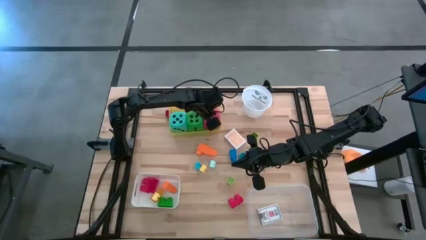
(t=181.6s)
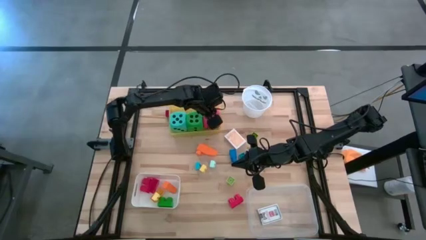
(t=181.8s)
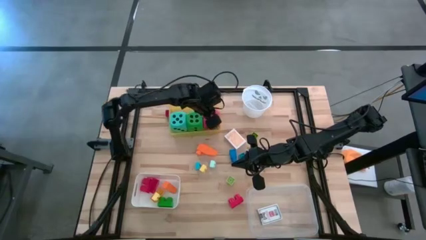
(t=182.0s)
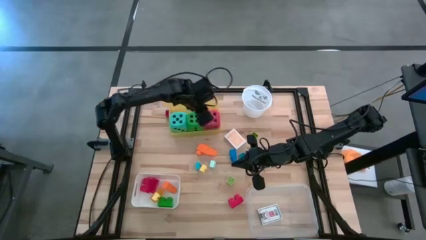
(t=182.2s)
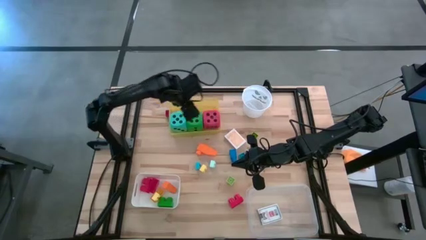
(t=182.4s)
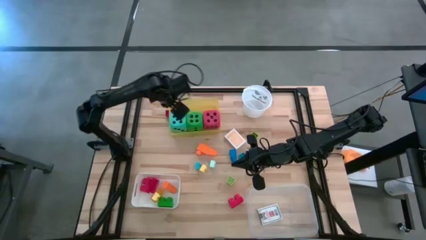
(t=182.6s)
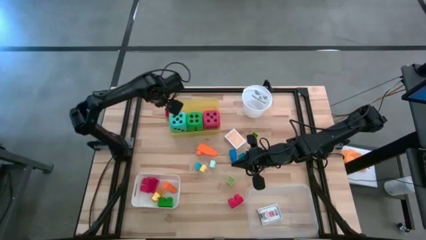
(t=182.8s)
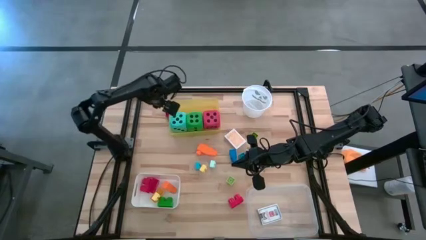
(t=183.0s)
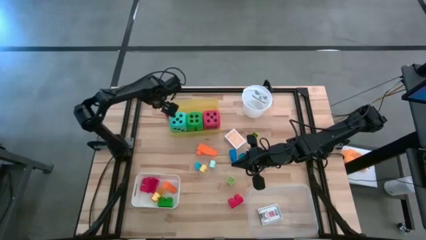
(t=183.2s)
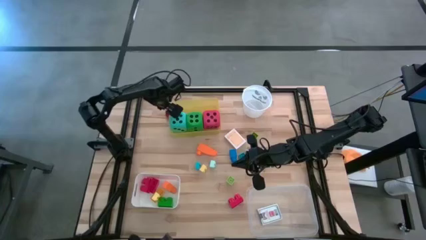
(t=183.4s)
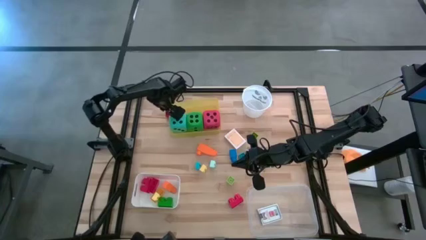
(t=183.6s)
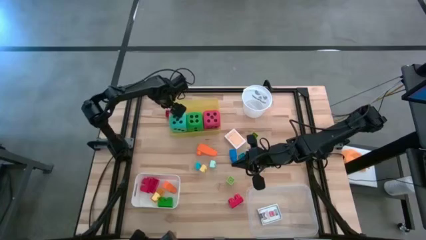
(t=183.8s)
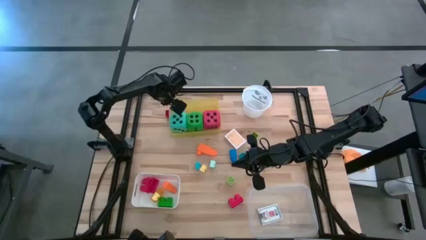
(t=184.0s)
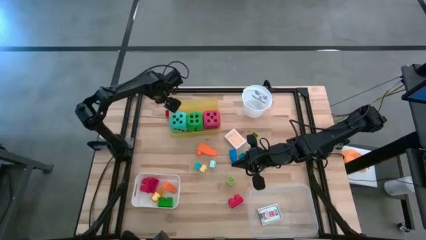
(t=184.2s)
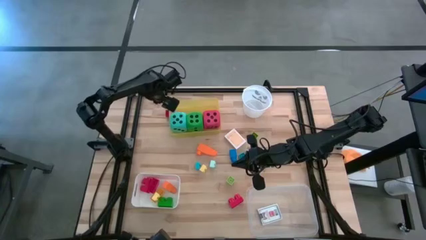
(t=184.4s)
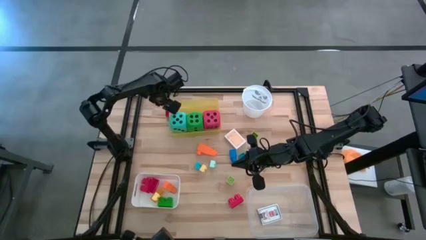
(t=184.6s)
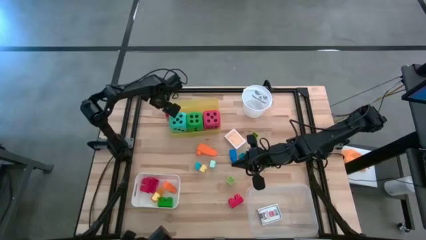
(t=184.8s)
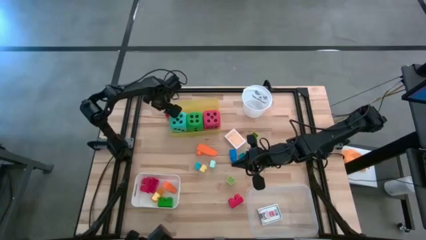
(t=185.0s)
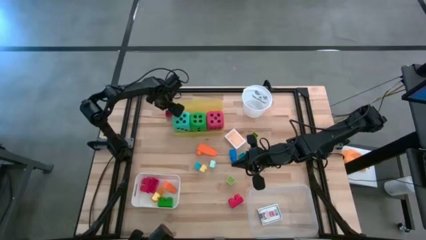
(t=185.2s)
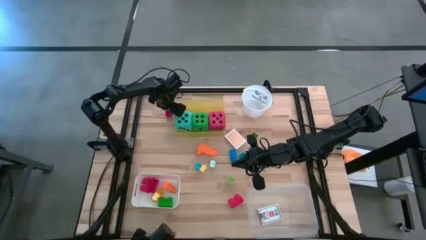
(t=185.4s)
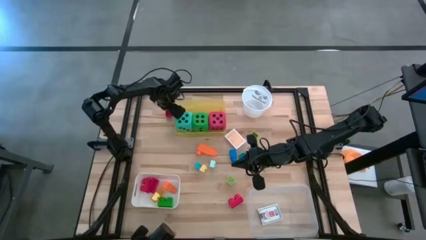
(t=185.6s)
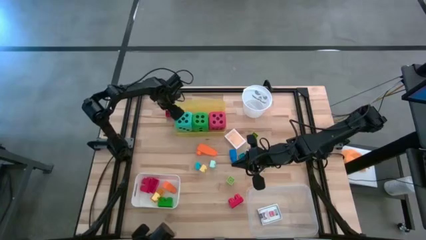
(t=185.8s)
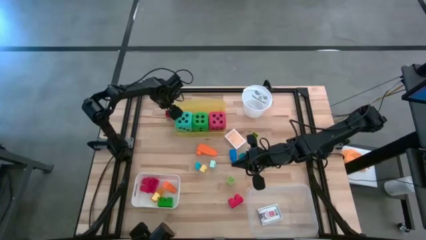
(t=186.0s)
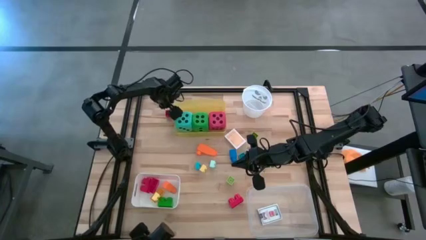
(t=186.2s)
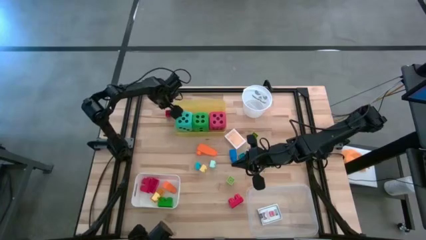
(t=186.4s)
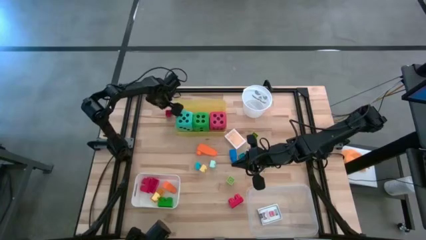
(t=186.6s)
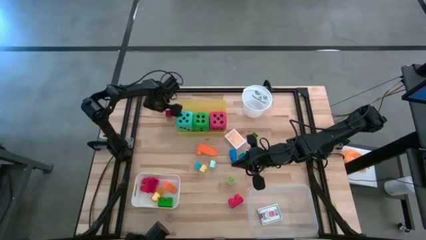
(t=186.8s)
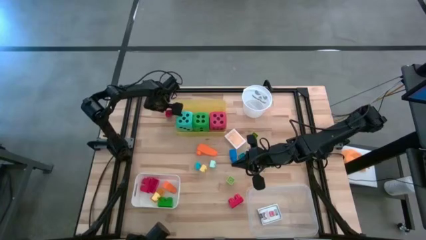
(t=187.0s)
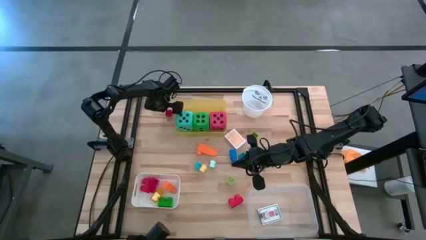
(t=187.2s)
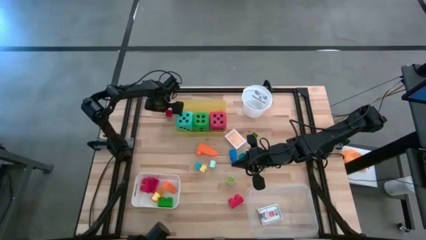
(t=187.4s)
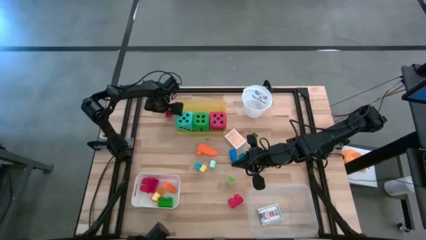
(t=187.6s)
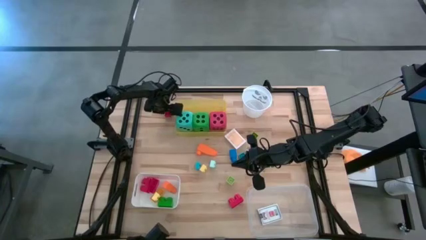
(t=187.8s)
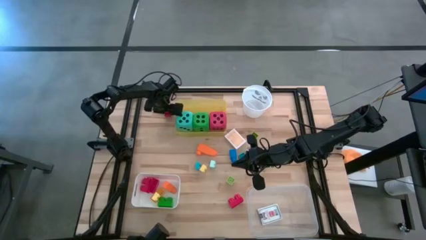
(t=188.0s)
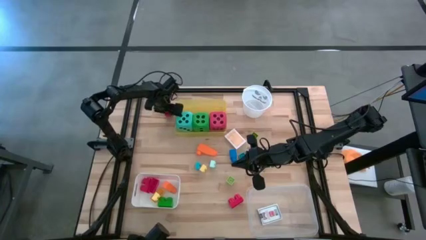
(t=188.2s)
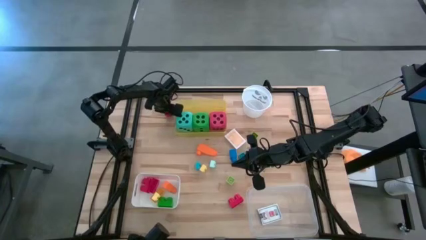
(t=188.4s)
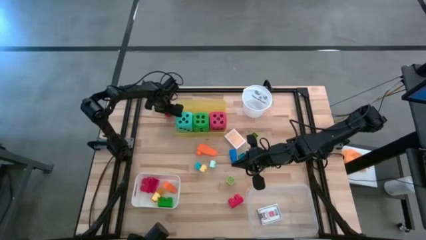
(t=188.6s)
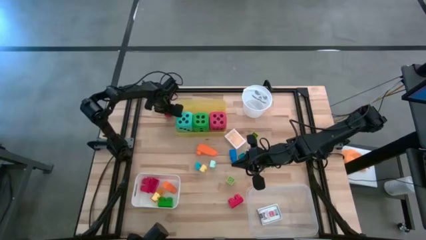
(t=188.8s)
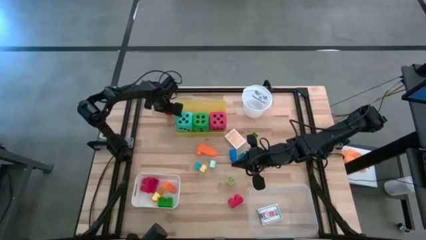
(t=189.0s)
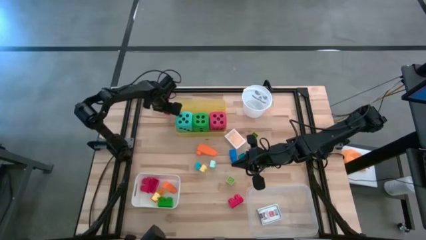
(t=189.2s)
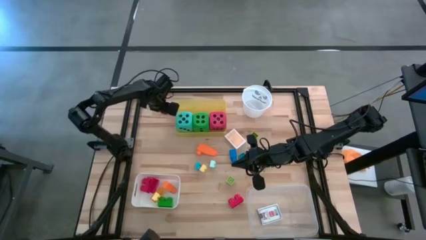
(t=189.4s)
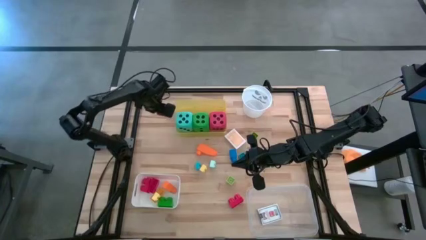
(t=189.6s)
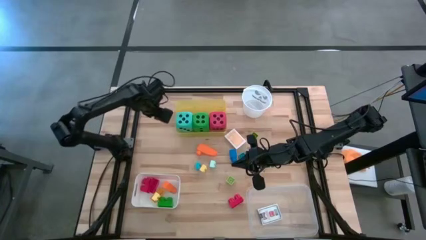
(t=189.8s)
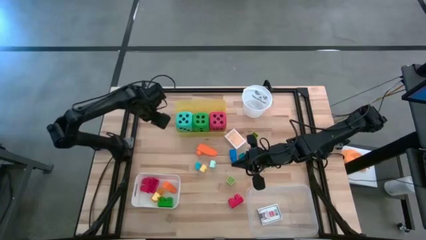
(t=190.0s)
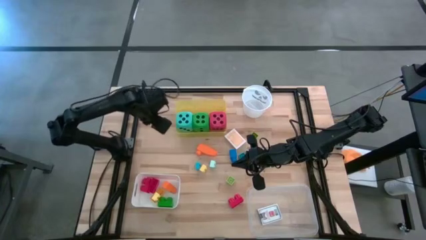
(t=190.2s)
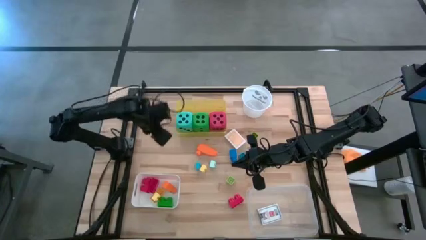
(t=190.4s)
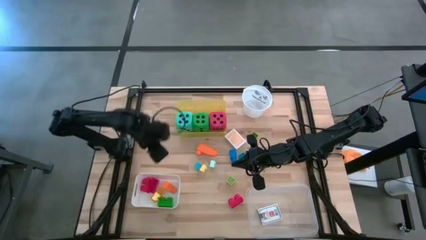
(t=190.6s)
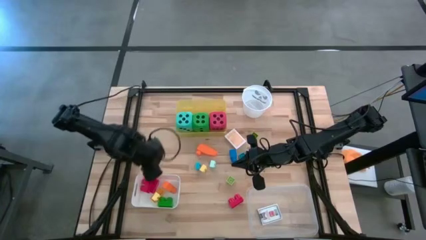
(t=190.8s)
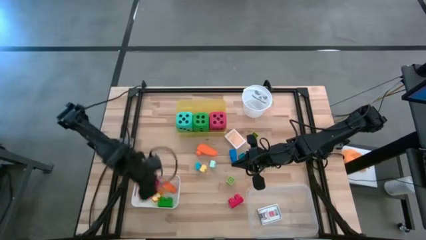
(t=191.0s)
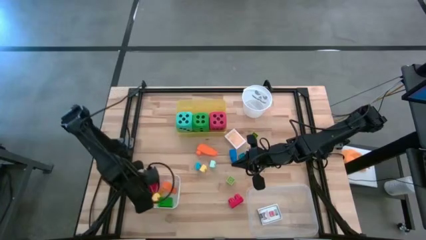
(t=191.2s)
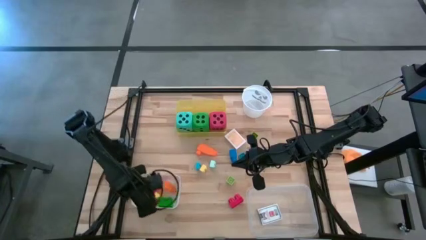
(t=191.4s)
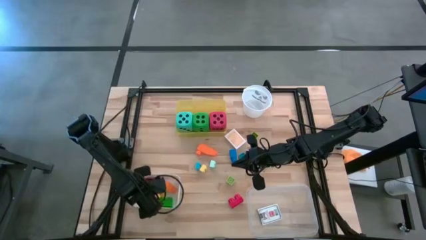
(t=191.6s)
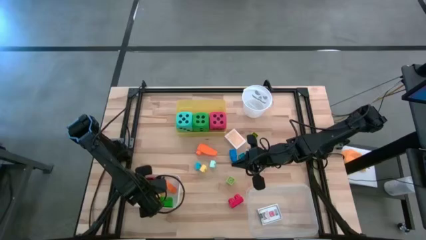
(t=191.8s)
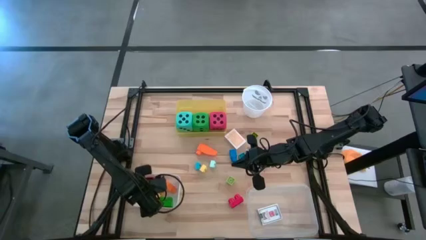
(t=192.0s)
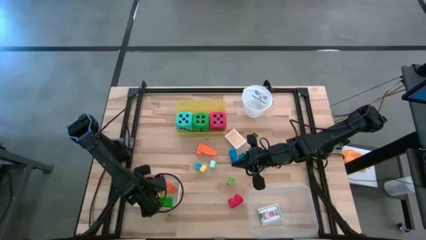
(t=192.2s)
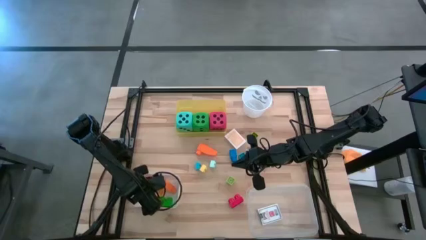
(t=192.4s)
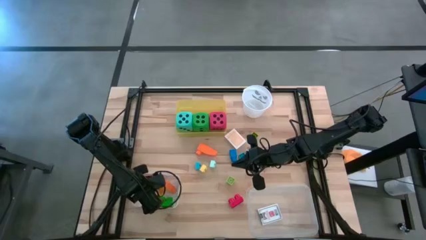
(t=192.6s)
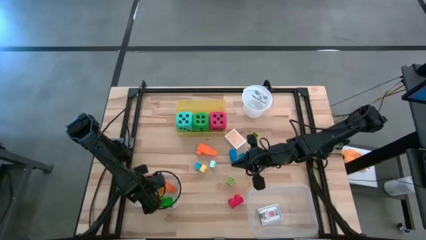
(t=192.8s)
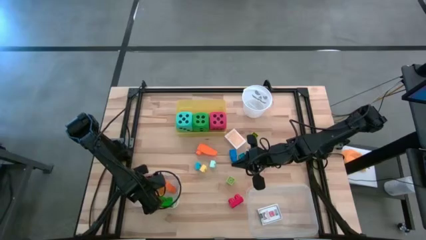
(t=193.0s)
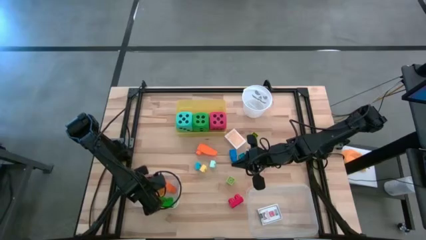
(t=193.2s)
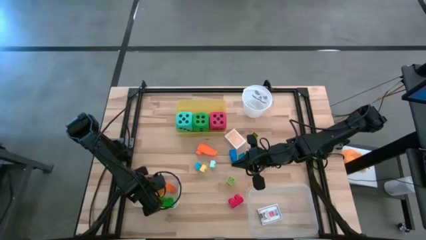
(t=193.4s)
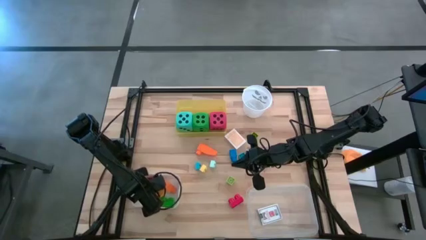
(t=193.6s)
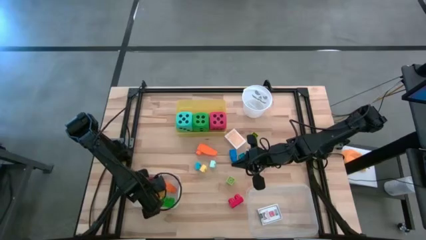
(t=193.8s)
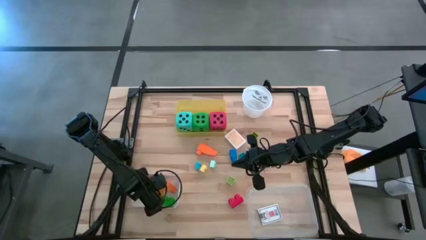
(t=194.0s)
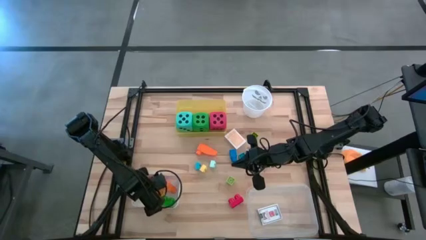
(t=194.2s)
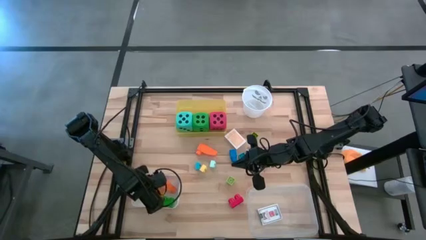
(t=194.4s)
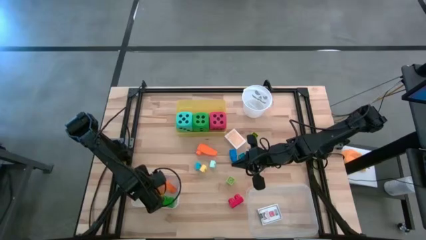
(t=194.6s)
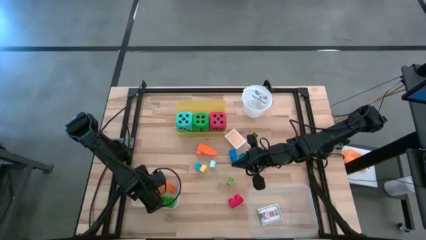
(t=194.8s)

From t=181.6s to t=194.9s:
Task: Pick & Place Toys
Put the red game piece into the white bin

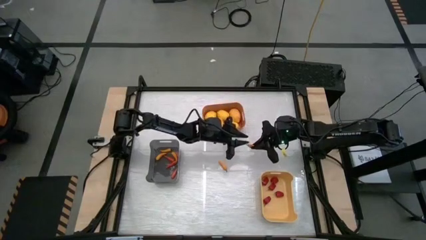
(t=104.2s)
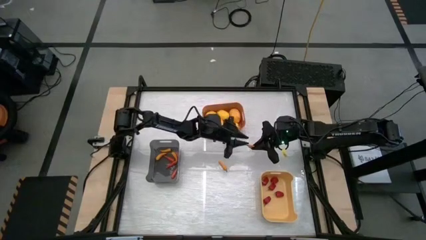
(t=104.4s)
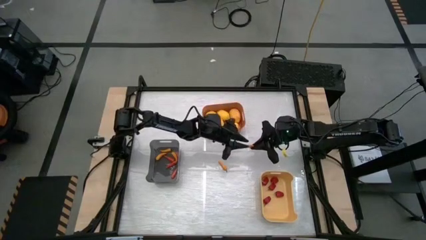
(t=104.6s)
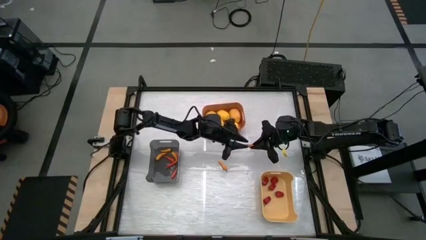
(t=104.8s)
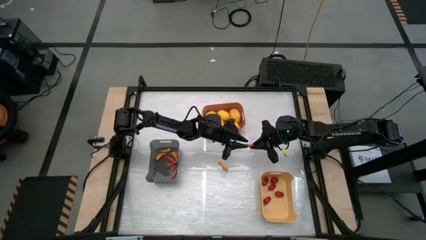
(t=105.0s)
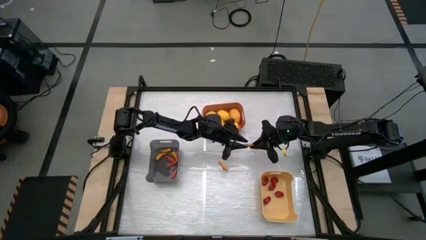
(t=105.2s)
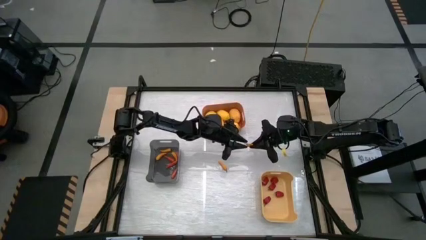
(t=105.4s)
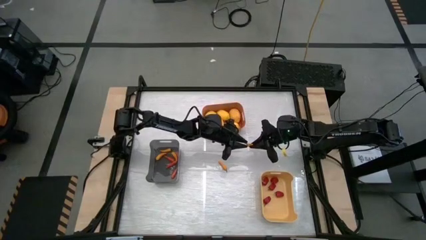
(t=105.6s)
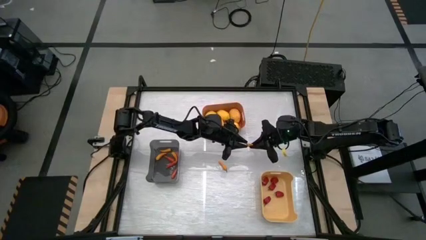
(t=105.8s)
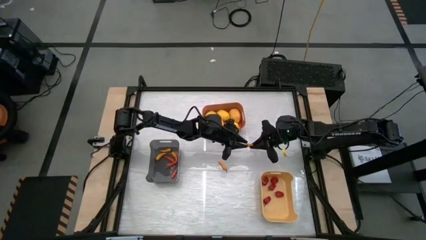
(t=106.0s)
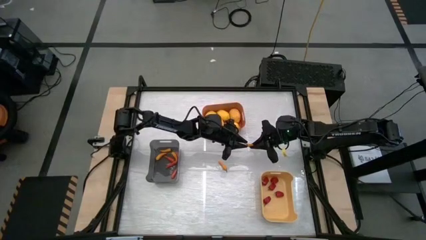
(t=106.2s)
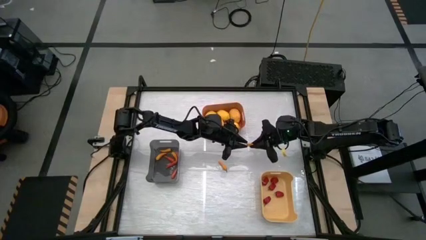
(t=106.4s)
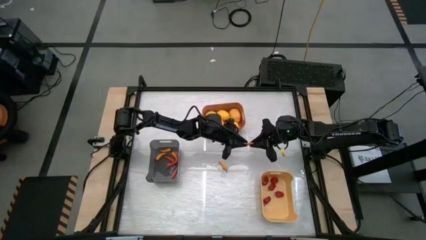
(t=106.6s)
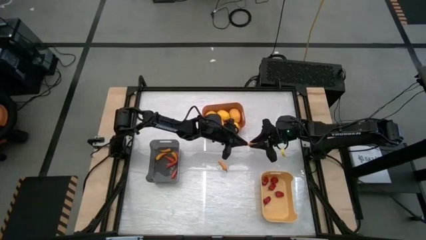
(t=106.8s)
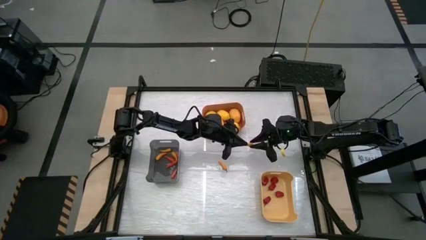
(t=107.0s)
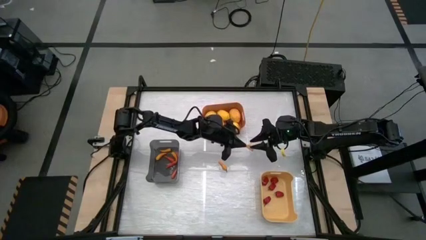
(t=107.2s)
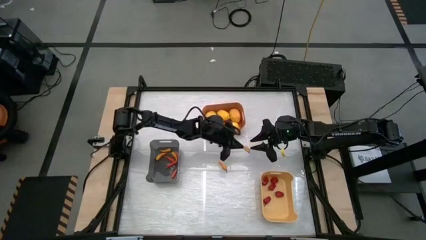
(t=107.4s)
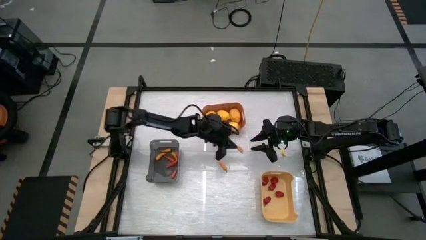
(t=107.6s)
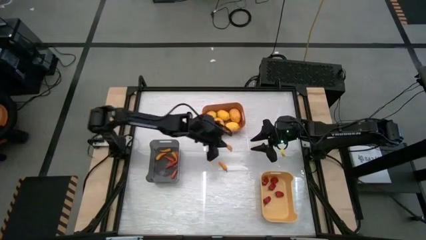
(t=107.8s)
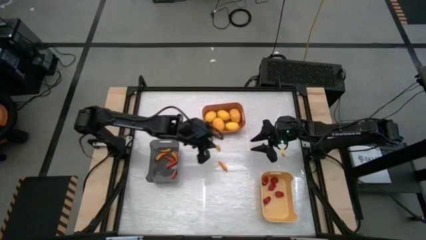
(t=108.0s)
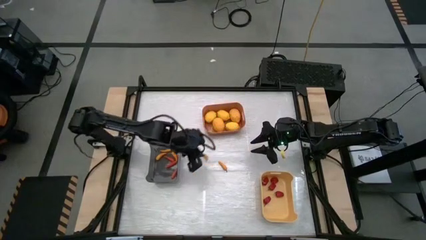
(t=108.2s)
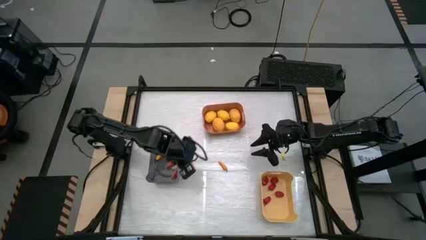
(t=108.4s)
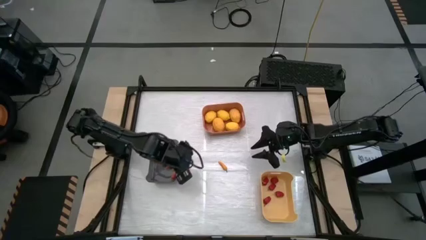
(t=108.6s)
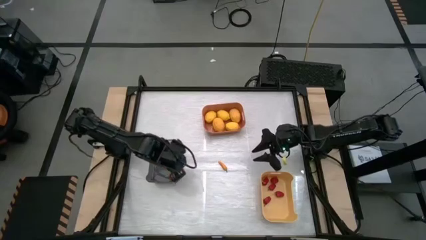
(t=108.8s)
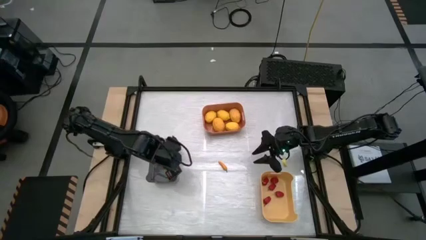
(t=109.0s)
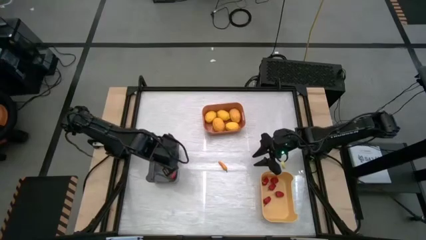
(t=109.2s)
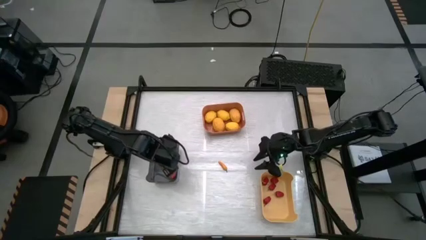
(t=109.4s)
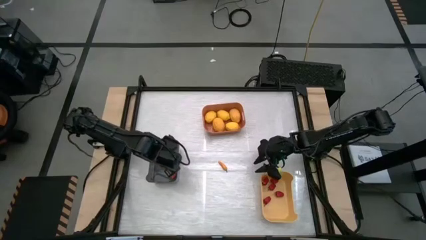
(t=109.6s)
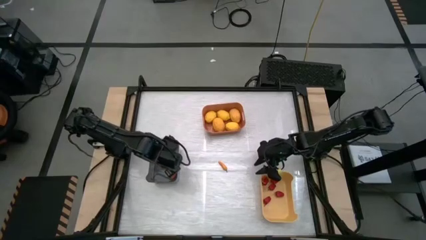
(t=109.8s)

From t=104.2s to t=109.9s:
Task: Sort produce into baskets
Put the yellow chili pepper into the black bin
